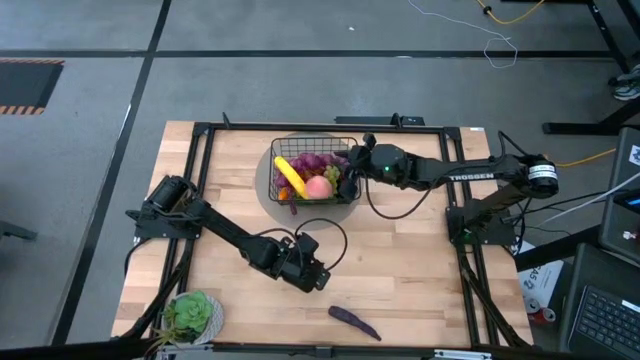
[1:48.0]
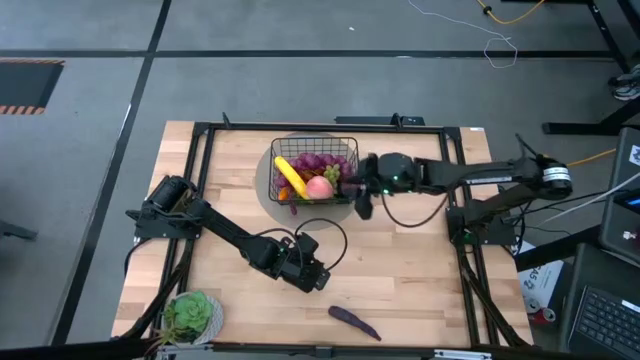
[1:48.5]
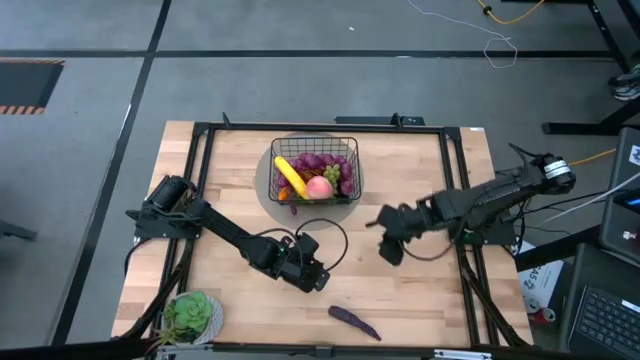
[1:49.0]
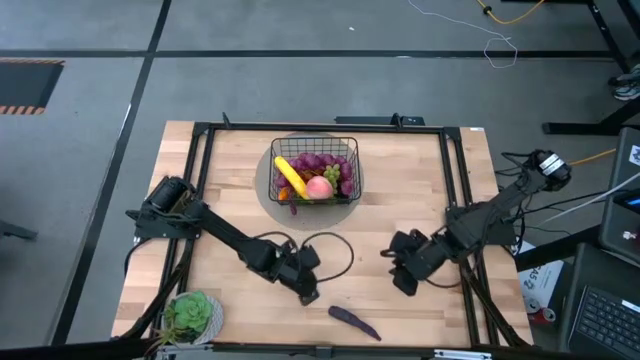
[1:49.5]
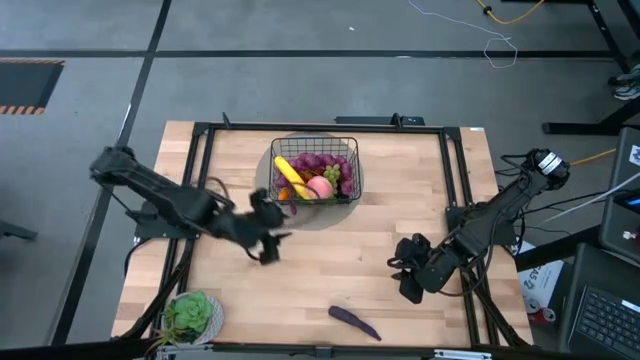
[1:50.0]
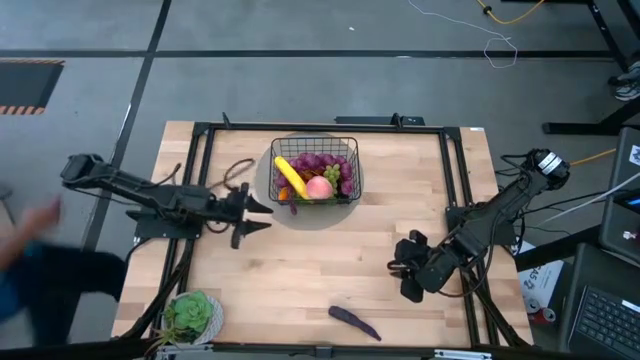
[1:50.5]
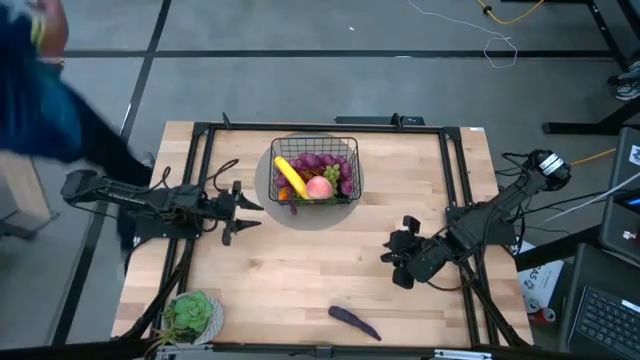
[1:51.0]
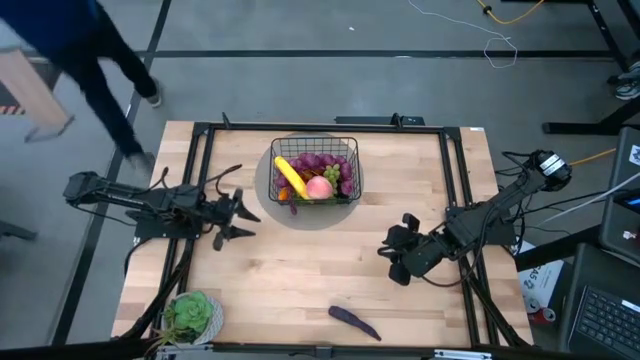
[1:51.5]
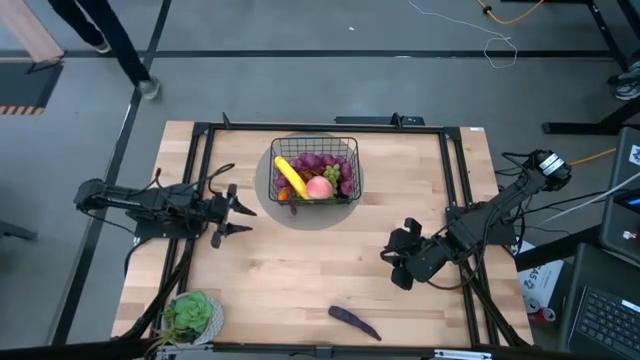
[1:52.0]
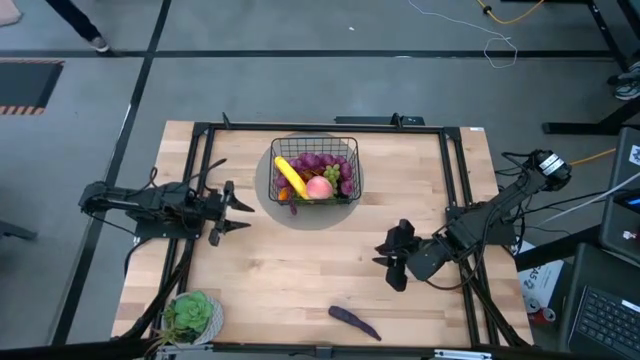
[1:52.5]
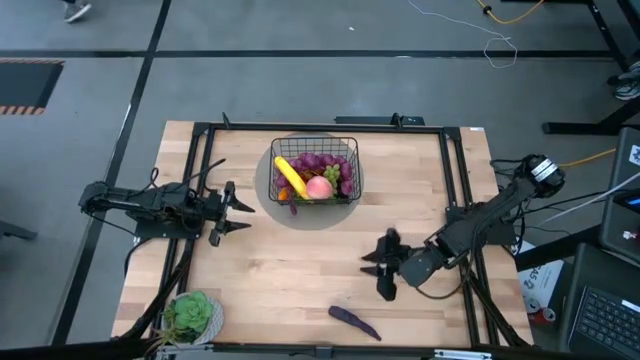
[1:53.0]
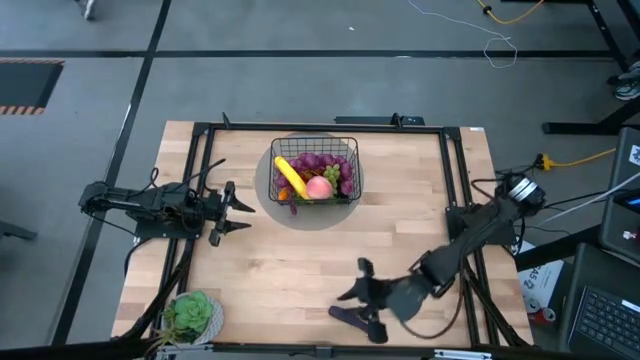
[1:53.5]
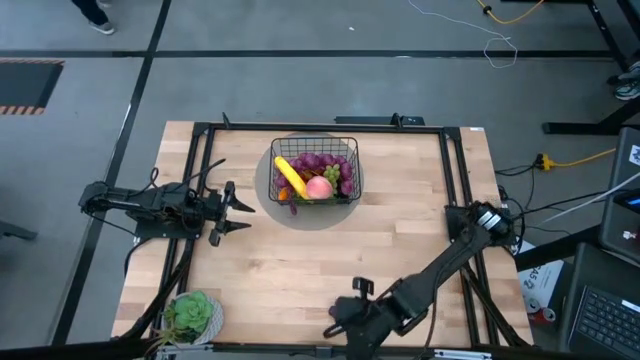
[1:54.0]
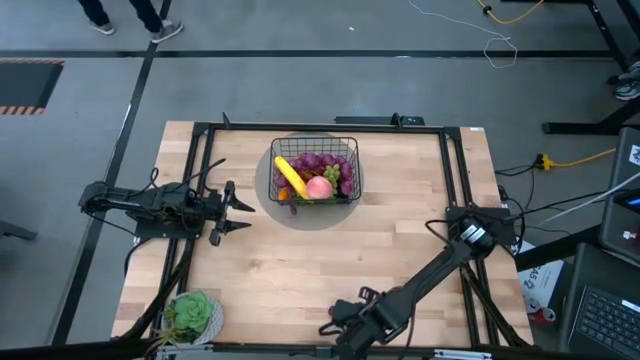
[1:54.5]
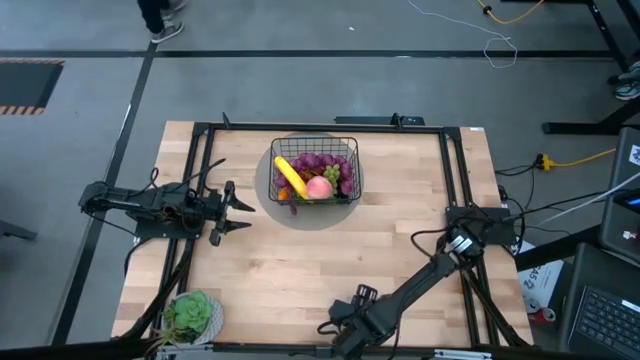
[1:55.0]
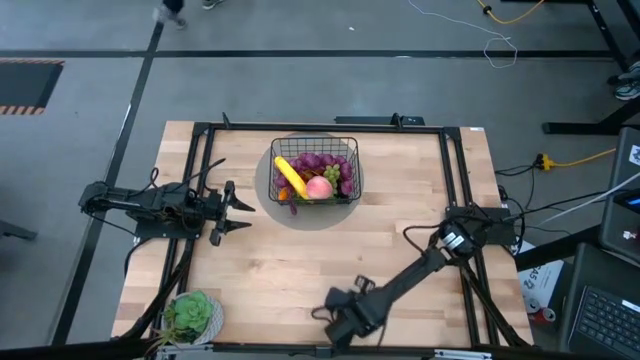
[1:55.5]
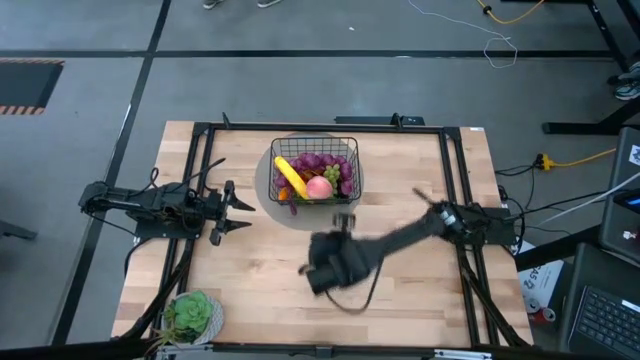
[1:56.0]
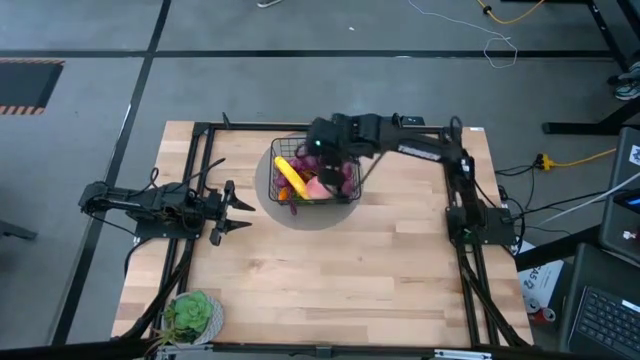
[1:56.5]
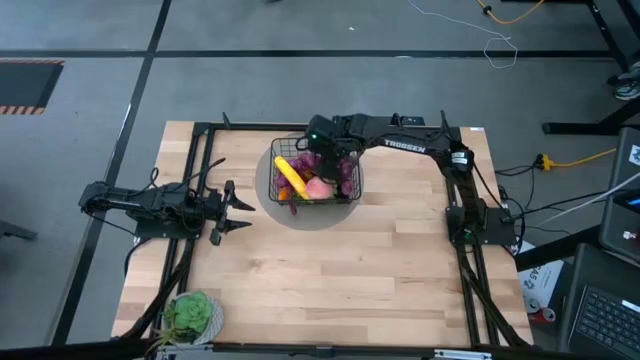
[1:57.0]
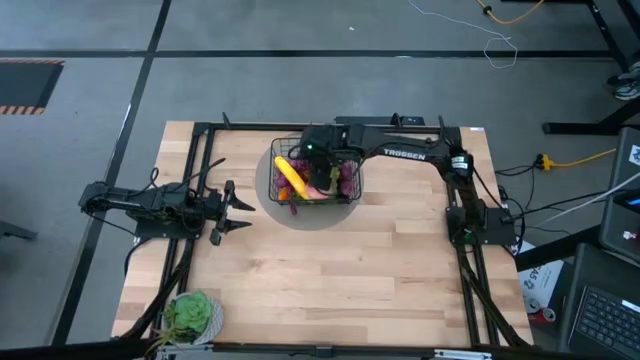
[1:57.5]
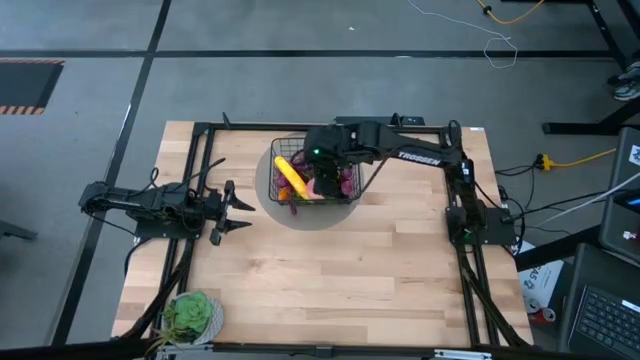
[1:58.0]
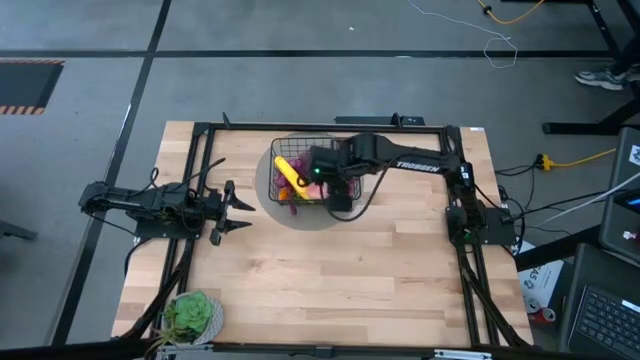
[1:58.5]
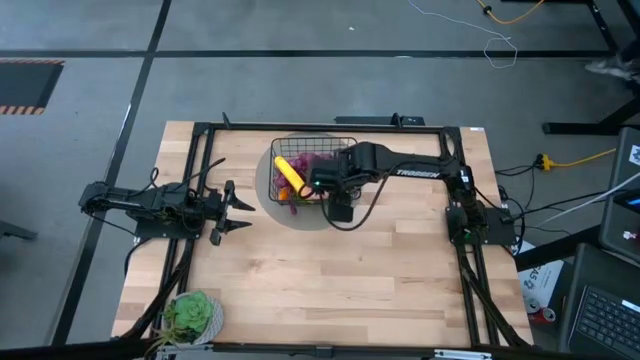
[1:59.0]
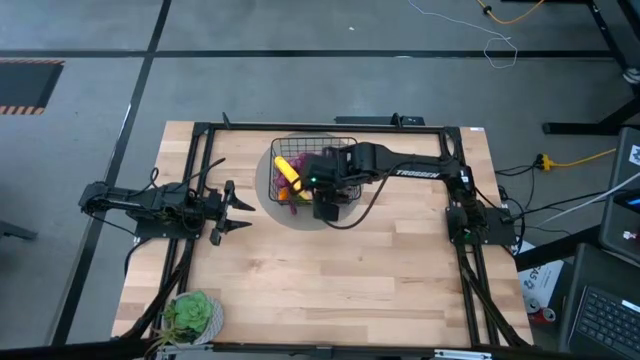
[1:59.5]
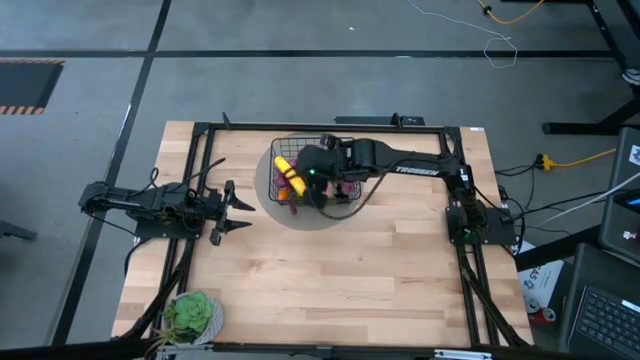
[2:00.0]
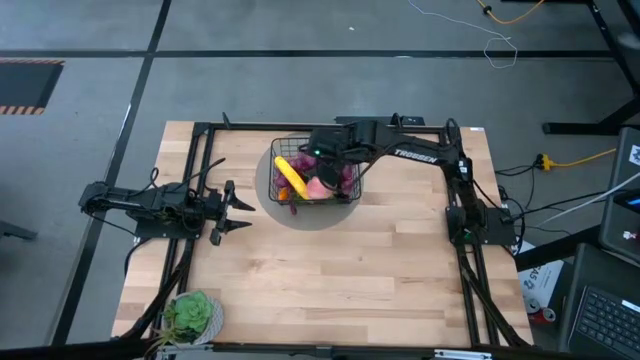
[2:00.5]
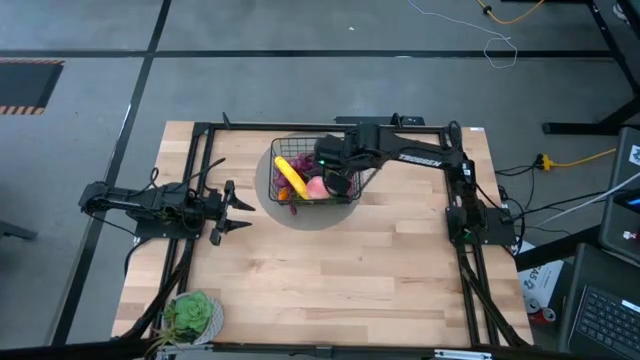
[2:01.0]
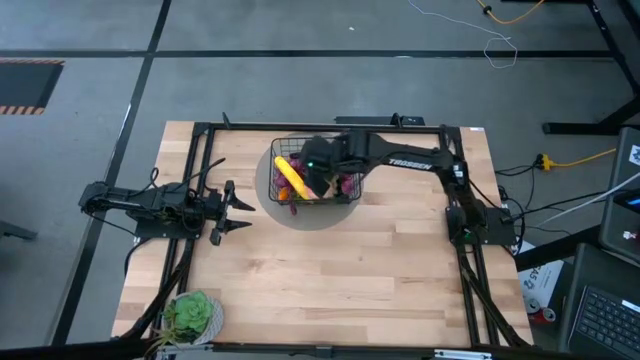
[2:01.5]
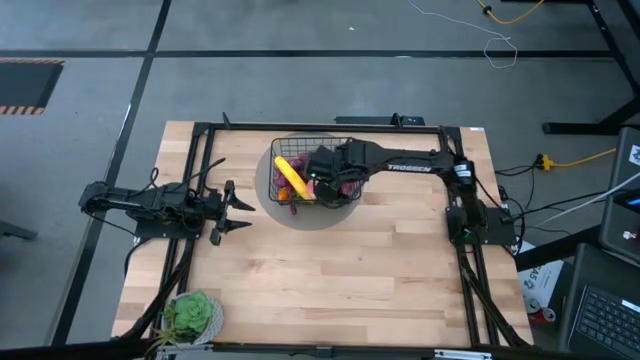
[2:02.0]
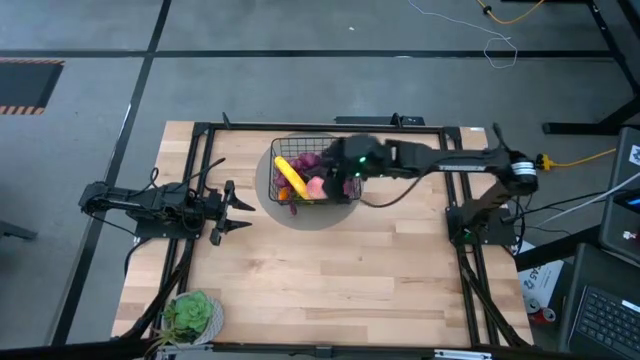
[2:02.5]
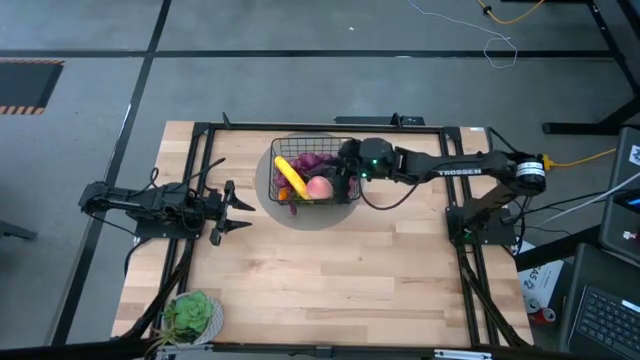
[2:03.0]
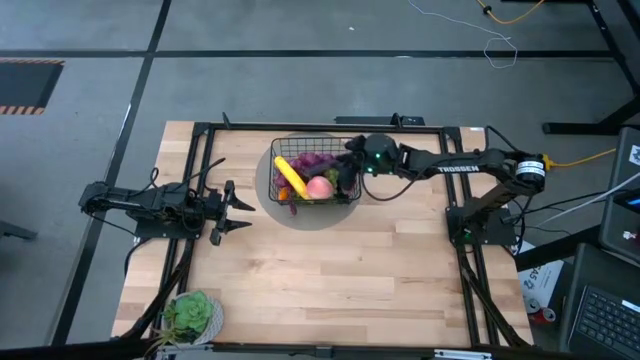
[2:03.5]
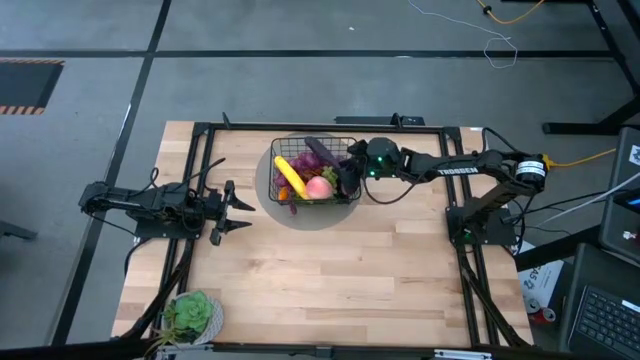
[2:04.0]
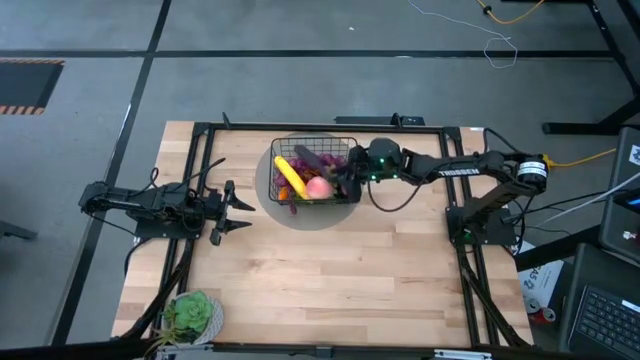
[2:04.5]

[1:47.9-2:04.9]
Task: Build produce basket
Put the purple eggplant into the wire basket

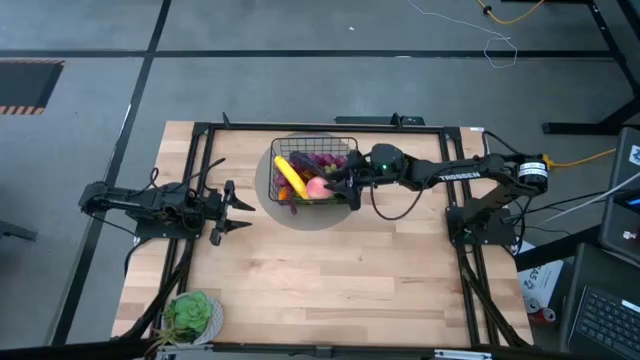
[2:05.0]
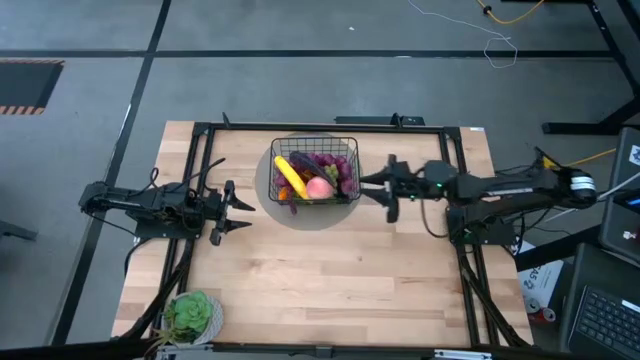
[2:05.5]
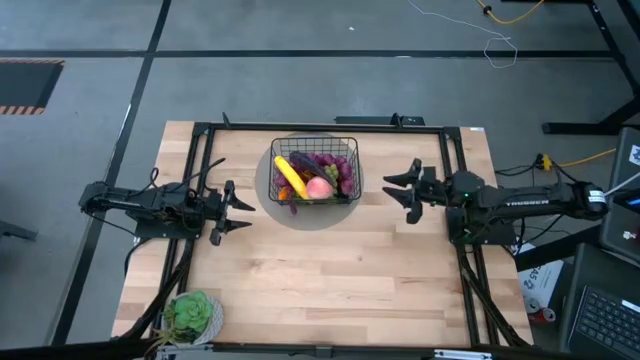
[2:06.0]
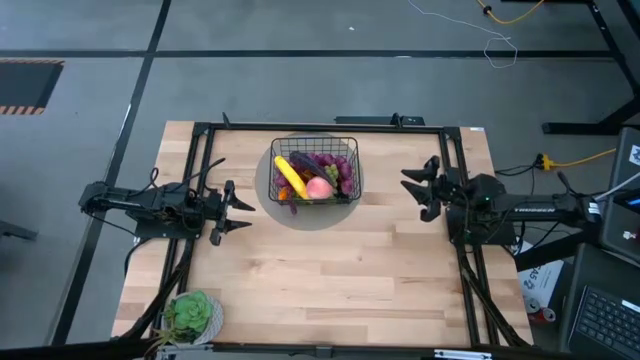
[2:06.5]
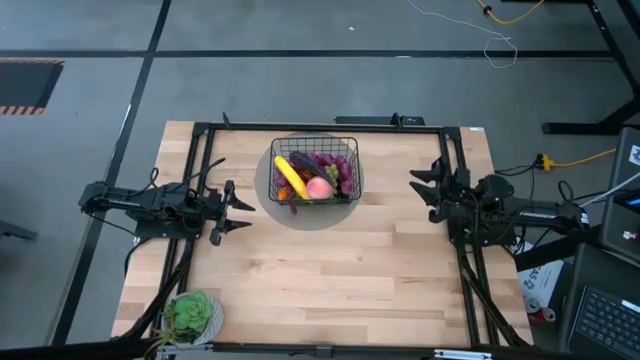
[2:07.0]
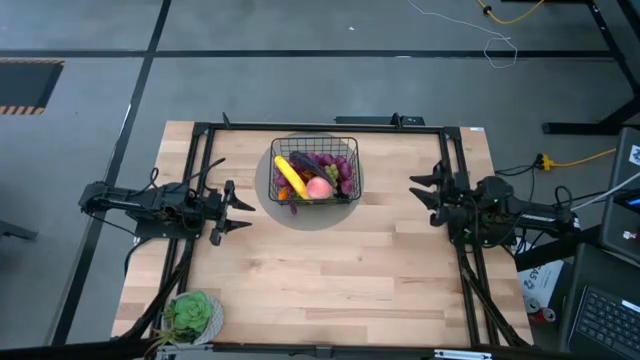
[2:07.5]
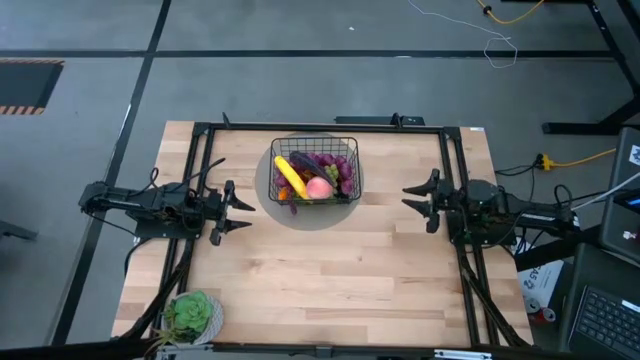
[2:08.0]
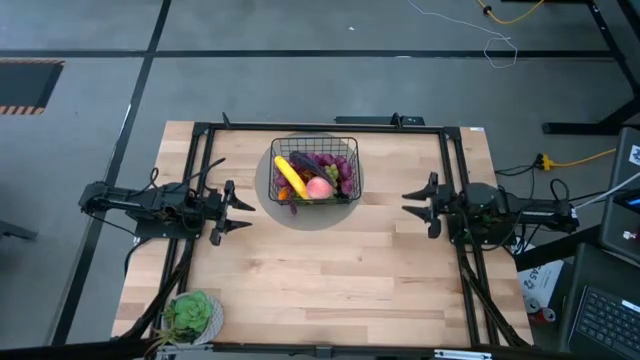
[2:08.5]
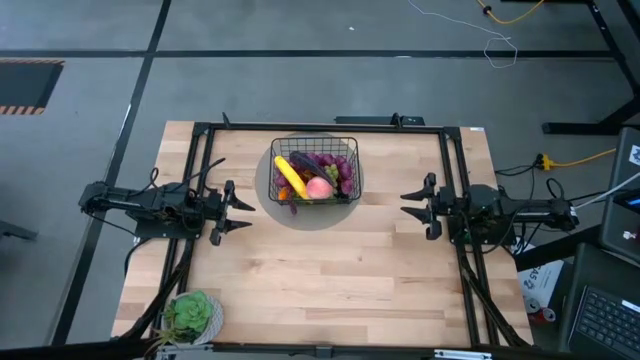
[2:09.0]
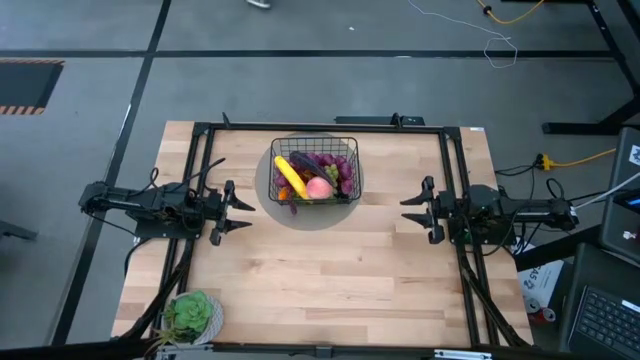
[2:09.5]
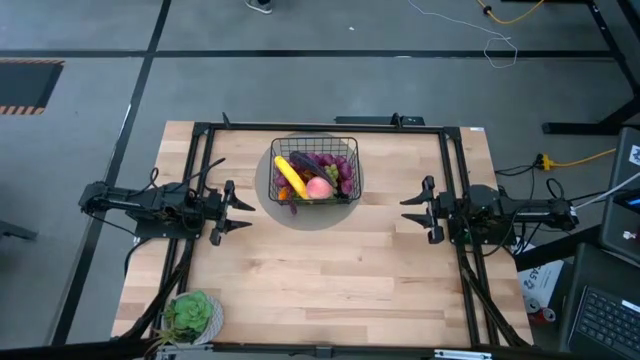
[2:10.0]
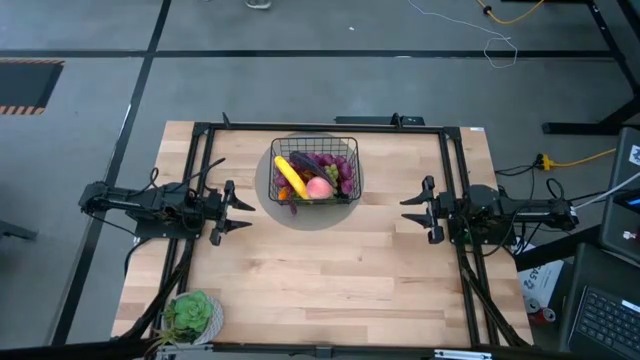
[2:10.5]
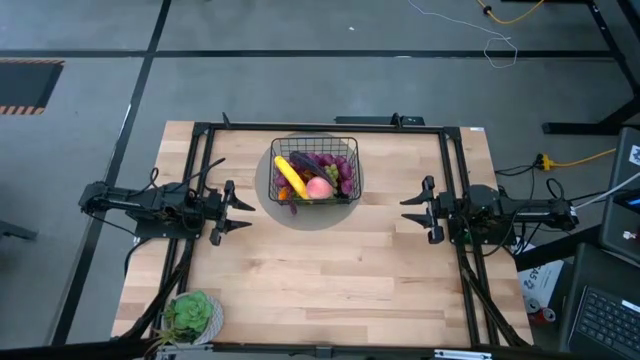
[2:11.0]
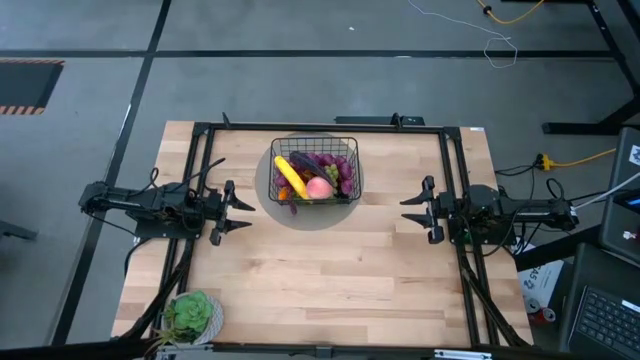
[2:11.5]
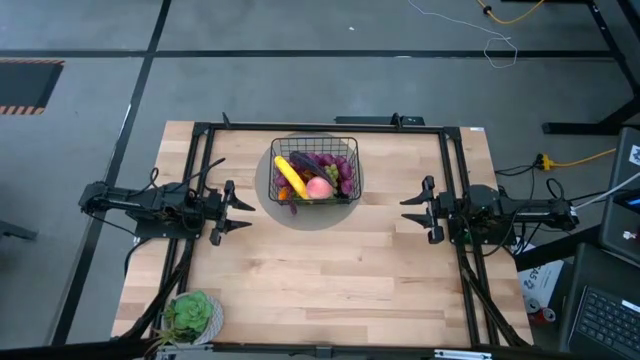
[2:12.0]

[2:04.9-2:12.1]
Return to Home Position
